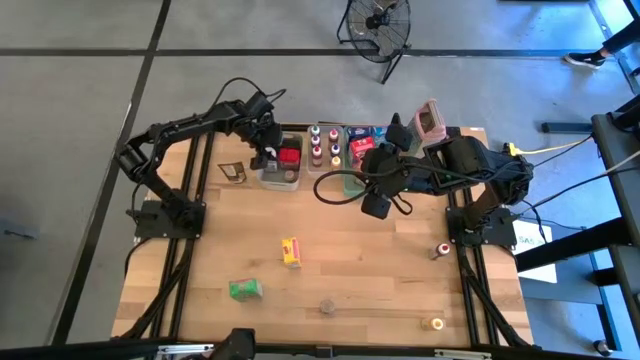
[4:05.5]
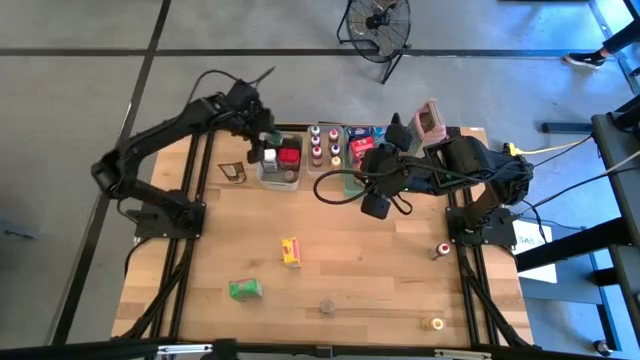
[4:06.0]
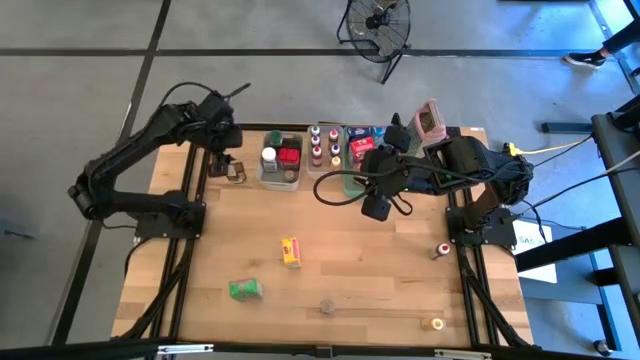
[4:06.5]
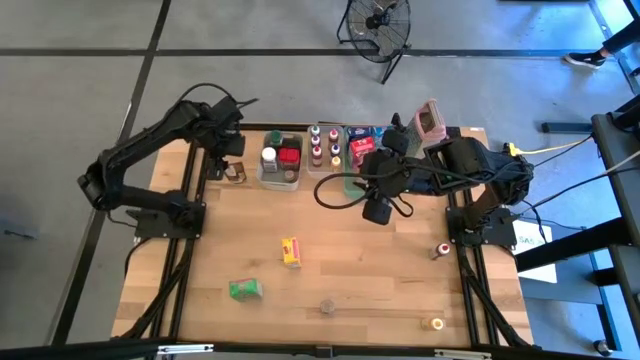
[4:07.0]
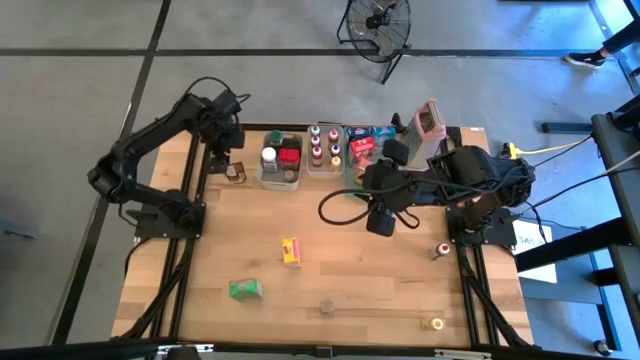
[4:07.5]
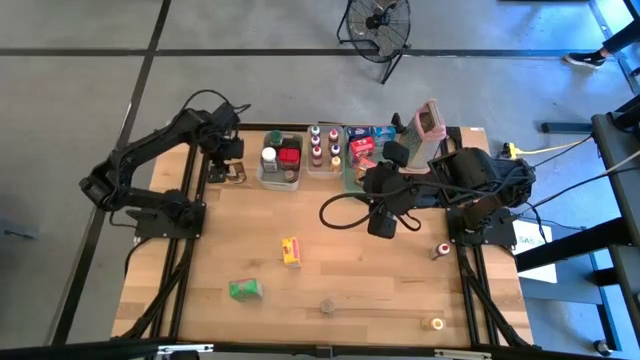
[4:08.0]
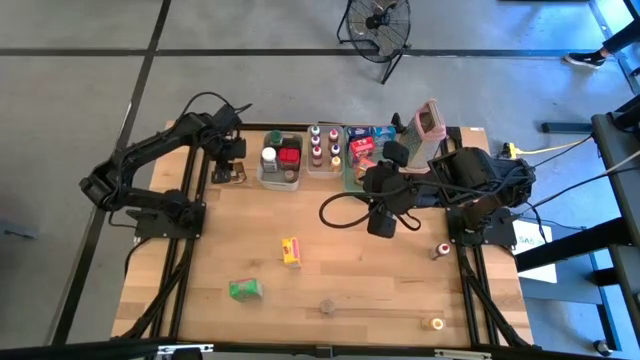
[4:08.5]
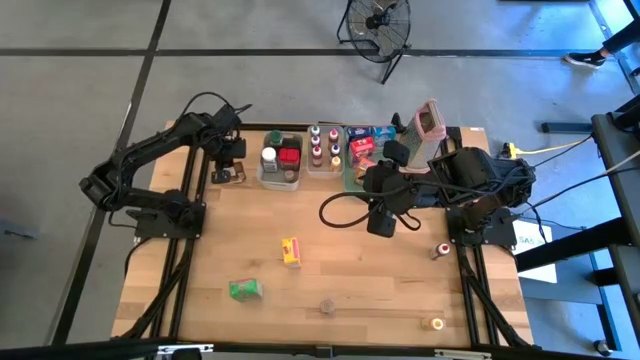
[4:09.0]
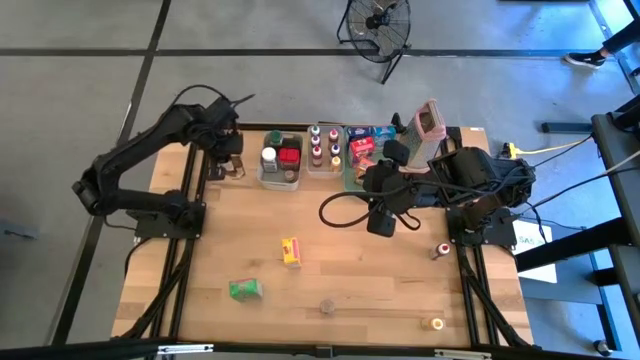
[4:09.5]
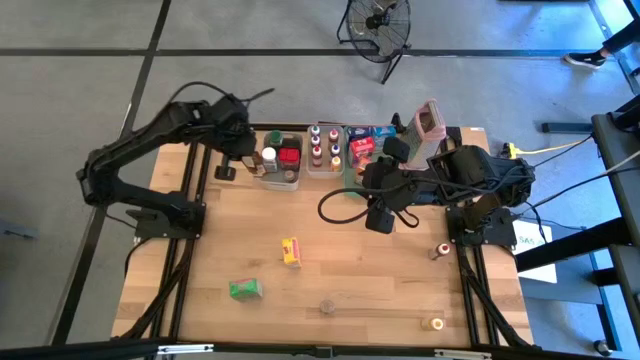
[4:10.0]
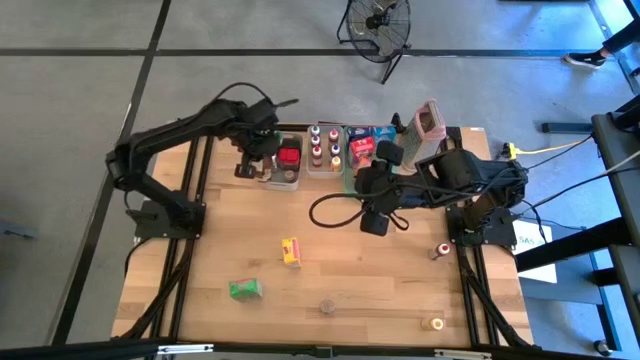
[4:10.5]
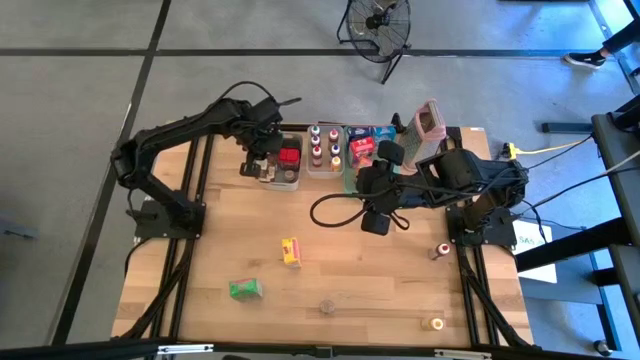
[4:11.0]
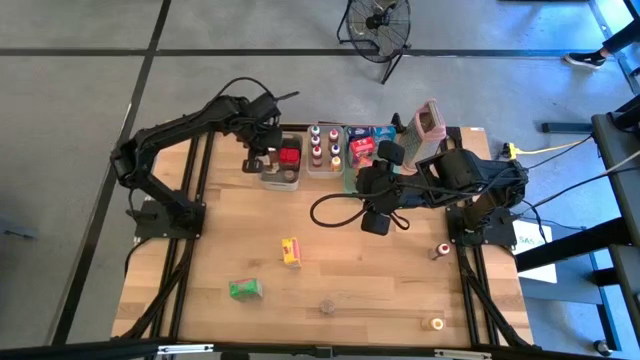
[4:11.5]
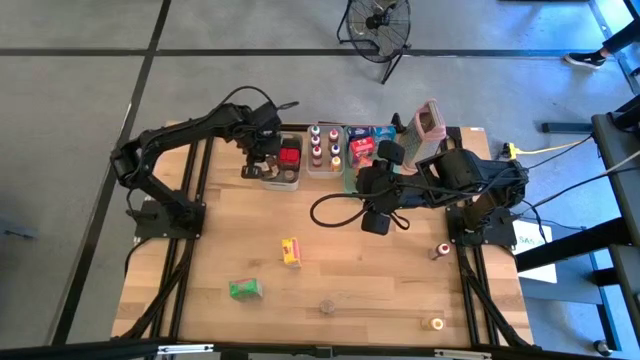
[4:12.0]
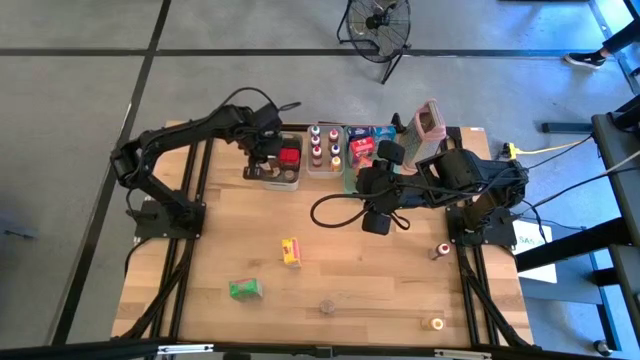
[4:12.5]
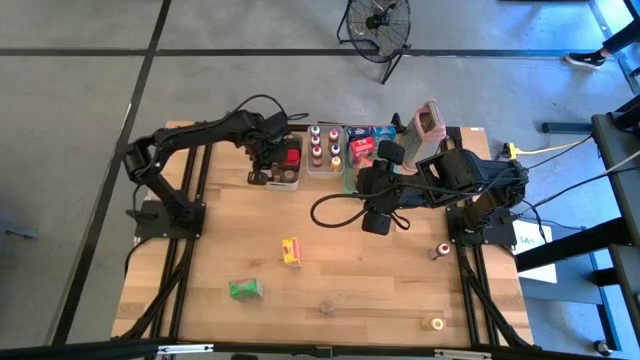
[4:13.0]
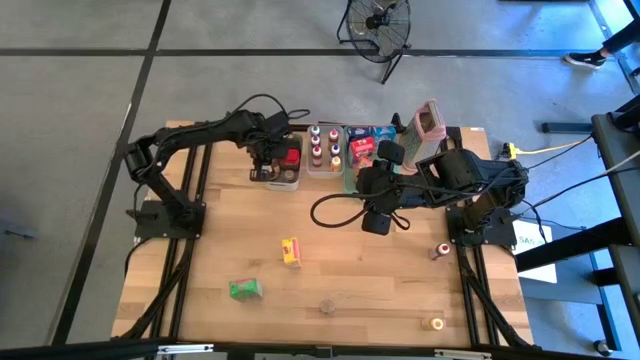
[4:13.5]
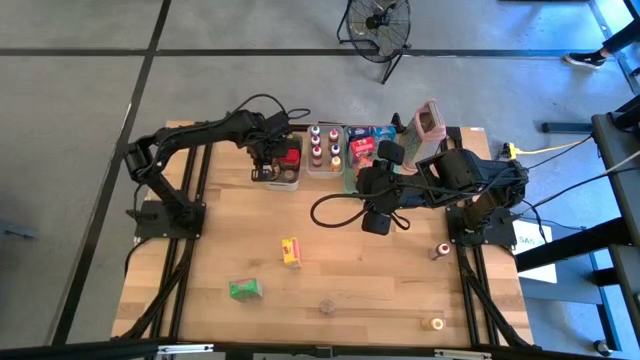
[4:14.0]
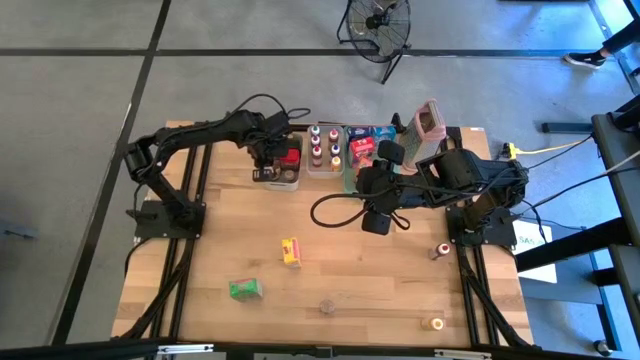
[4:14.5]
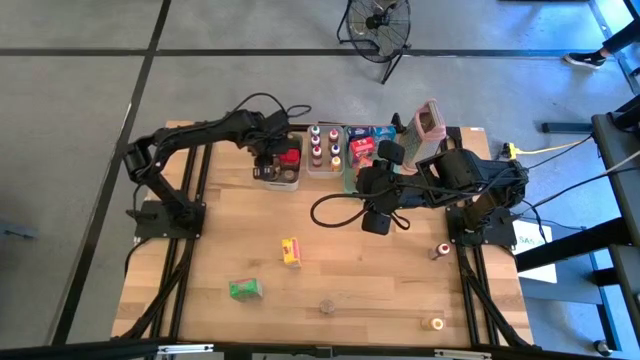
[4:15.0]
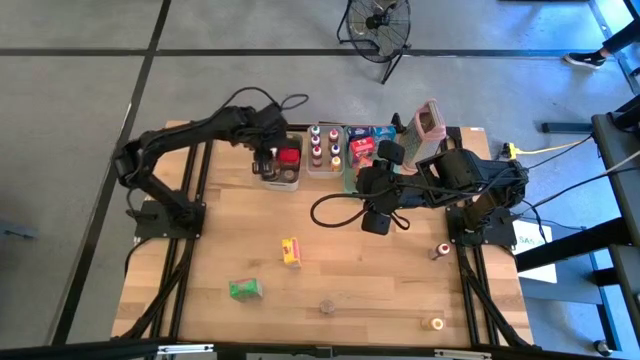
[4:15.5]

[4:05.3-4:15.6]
Task: Pick & Place Kitchen Items
Put the orange seasoning pack into the gray bin

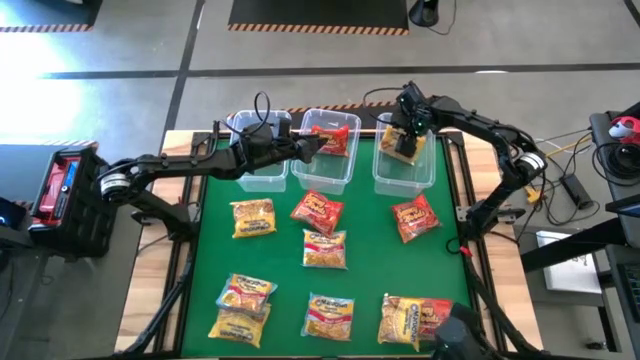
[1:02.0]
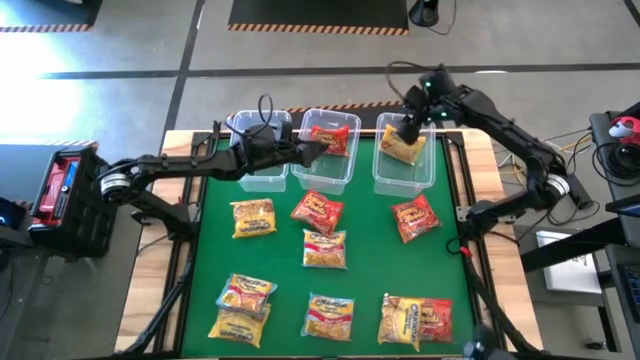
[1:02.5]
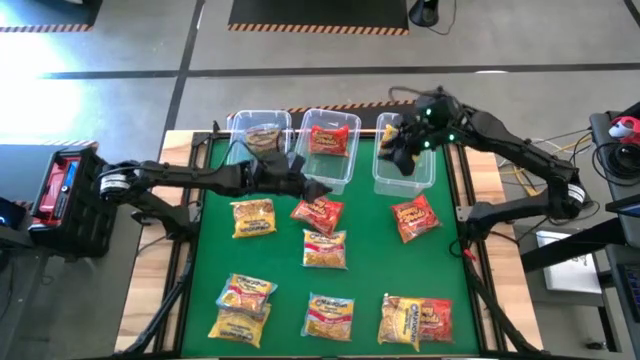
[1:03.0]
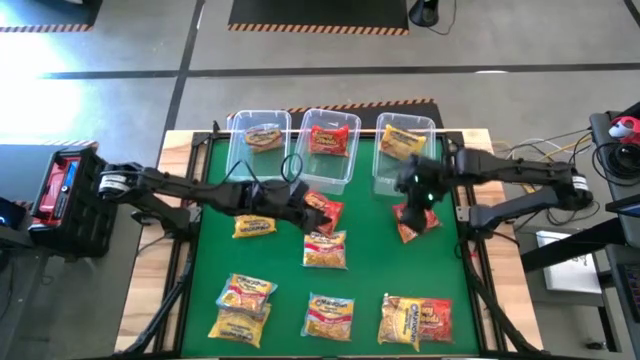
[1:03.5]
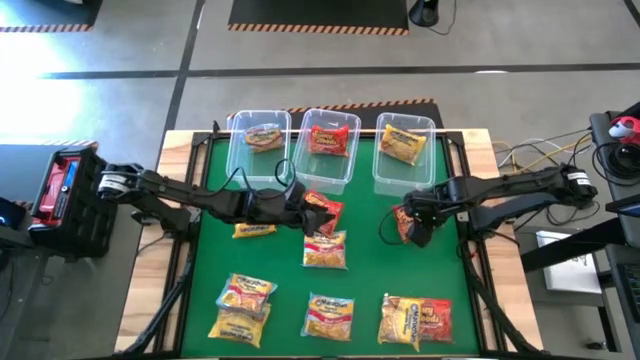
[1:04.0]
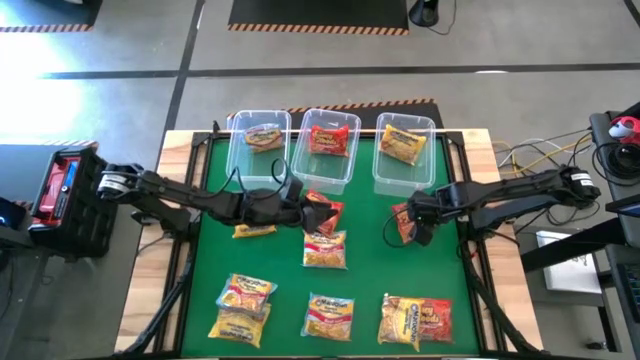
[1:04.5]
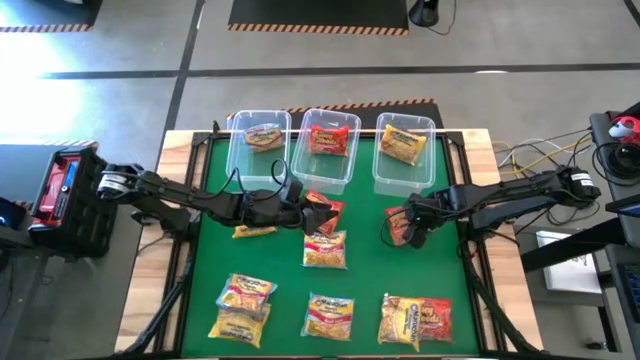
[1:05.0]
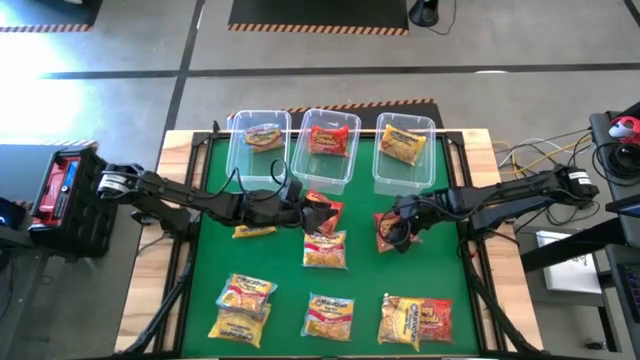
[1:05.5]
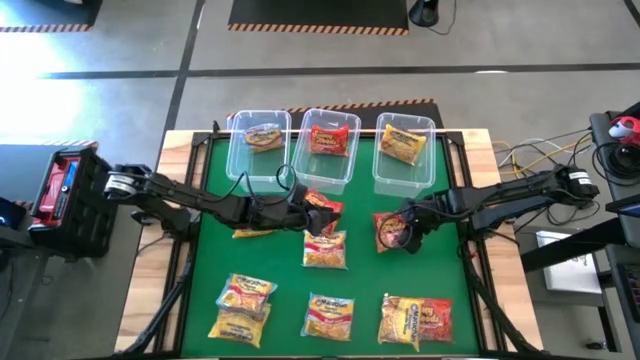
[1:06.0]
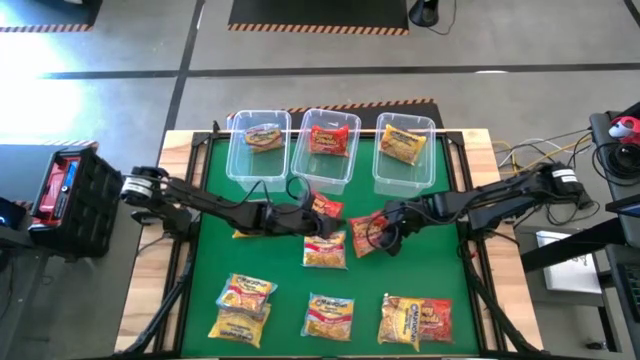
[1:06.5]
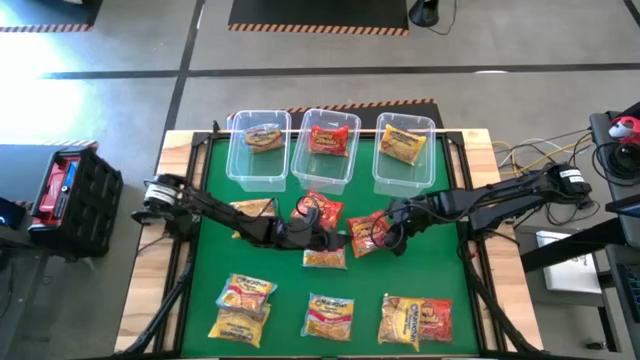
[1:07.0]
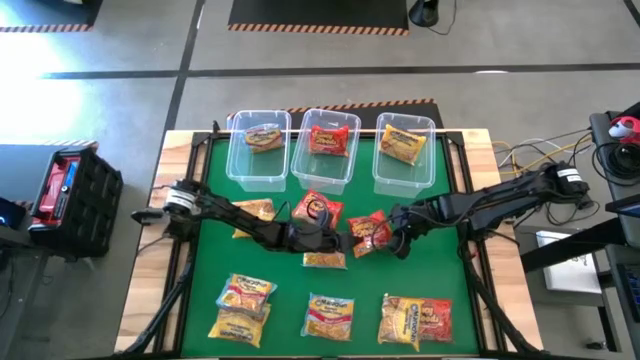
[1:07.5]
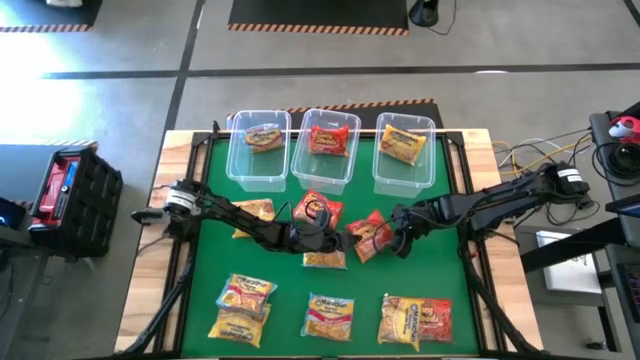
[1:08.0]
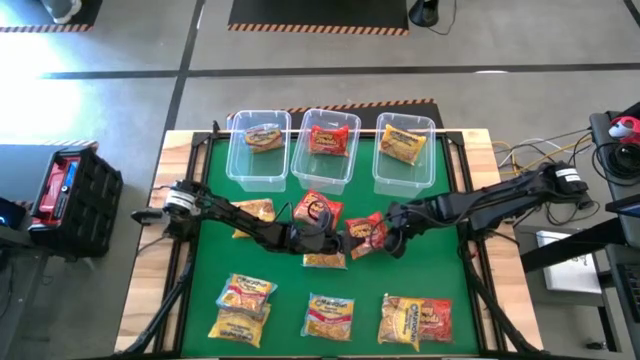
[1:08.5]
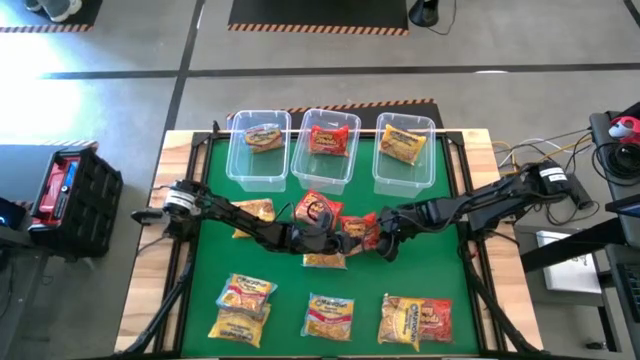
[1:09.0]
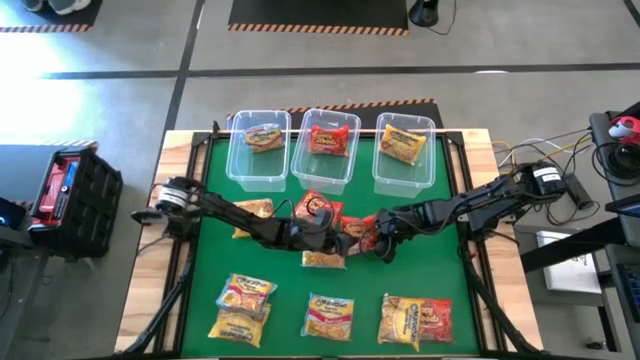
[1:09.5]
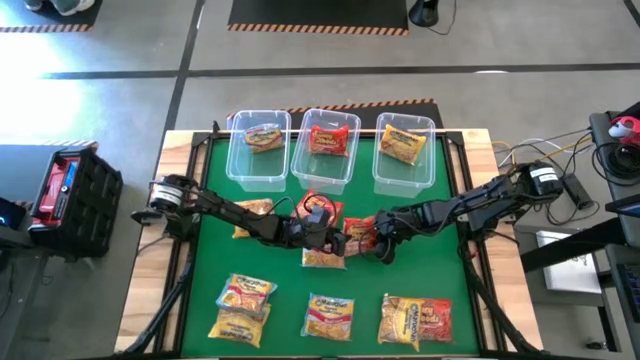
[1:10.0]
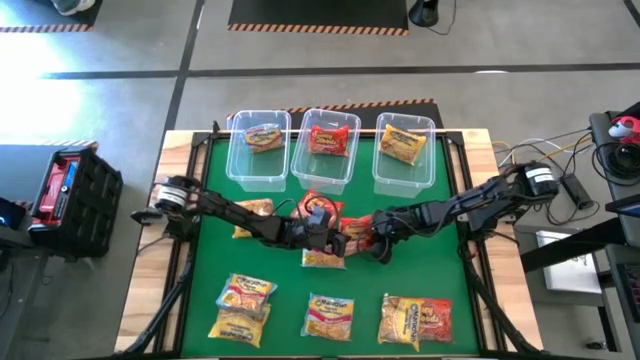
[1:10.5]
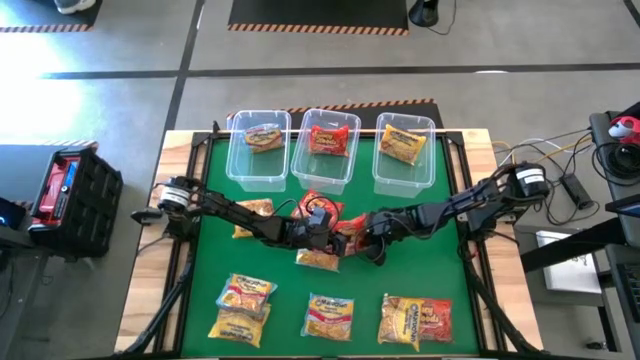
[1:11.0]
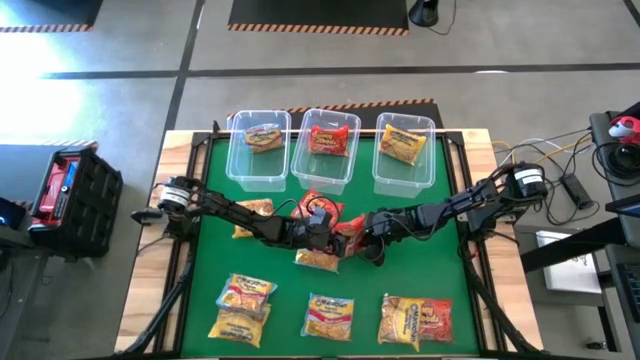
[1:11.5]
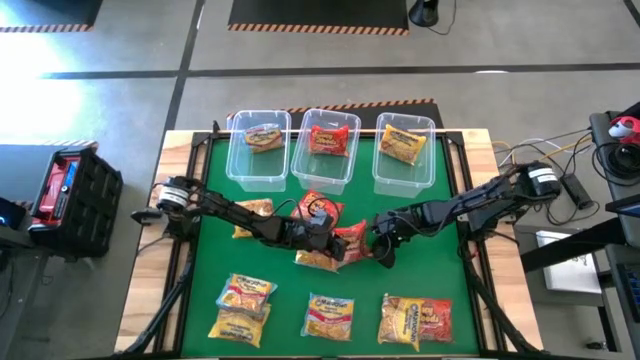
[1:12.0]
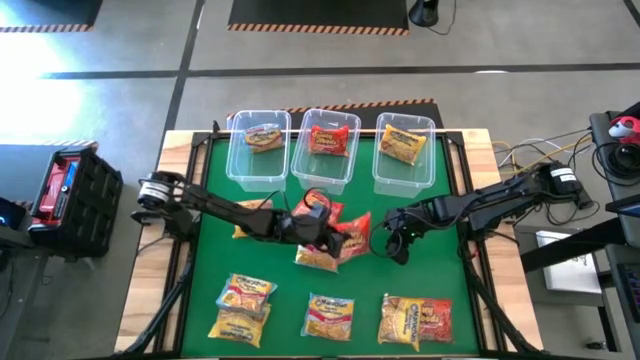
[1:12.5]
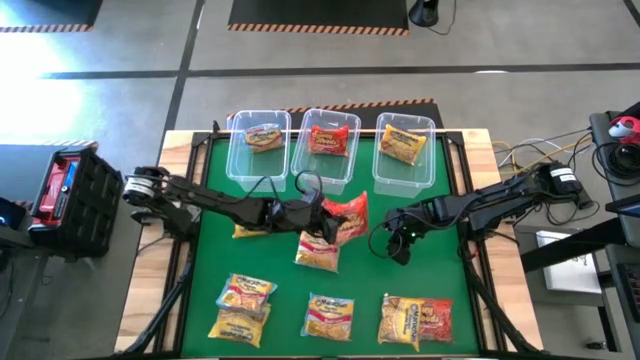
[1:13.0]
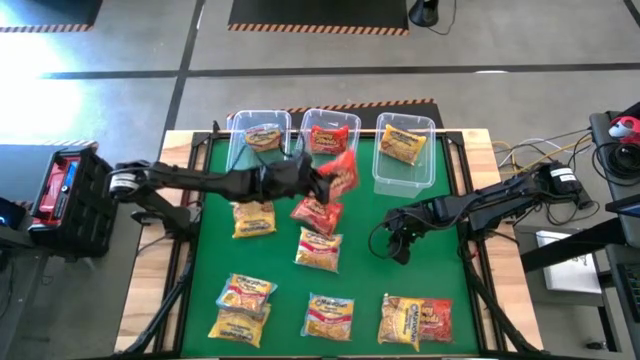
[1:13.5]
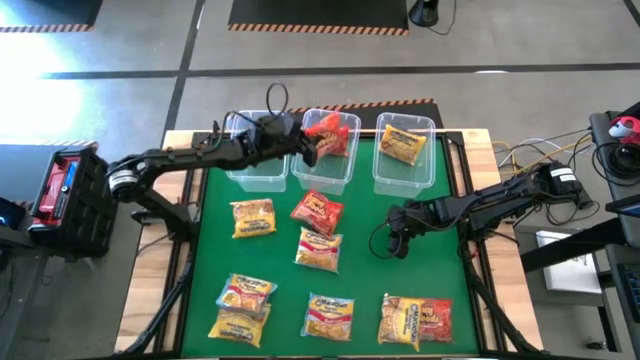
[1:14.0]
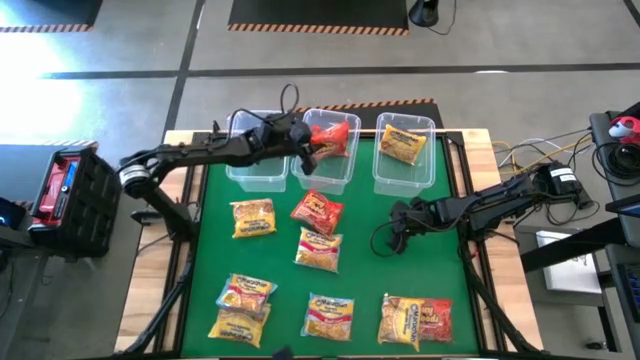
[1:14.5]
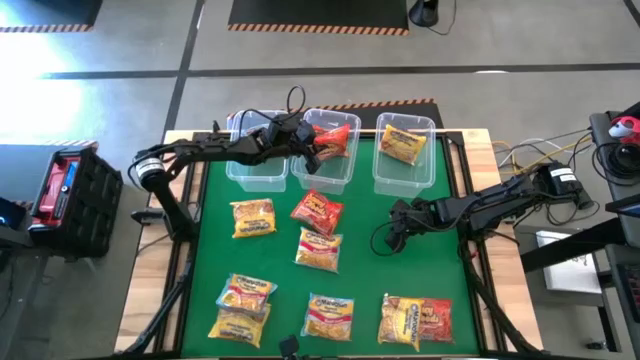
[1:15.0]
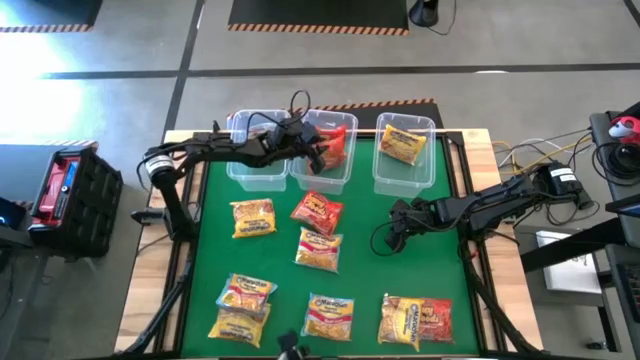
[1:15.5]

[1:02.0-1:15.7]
Task: Sort Maruchan noodles
Put the top right orange noodle pack into the top center transparent bin
